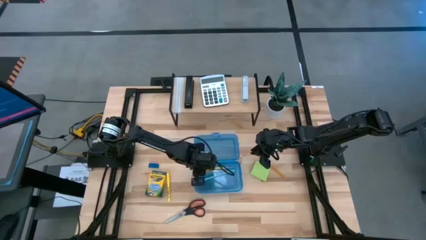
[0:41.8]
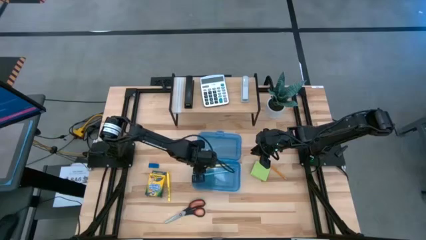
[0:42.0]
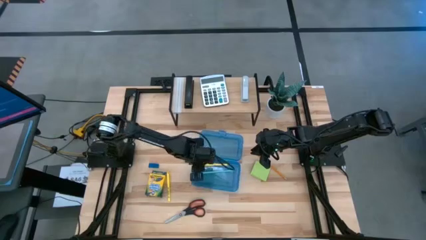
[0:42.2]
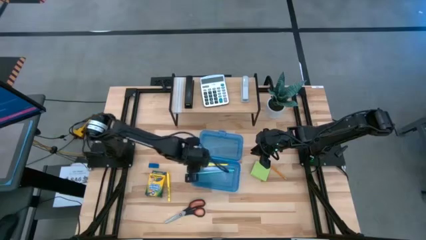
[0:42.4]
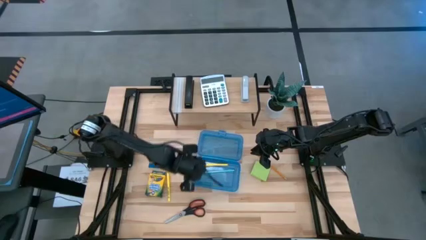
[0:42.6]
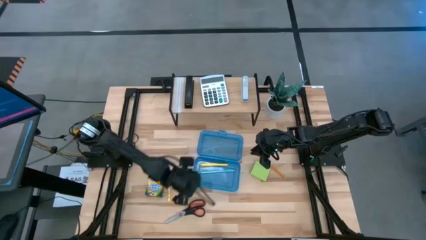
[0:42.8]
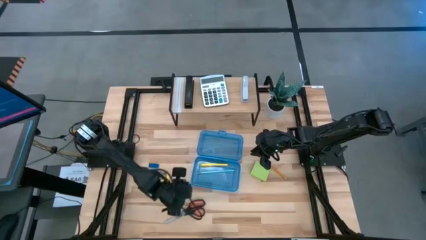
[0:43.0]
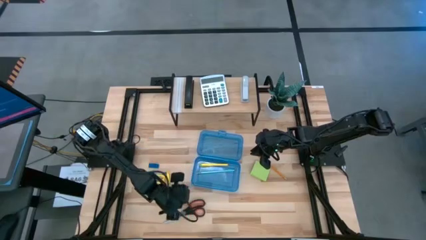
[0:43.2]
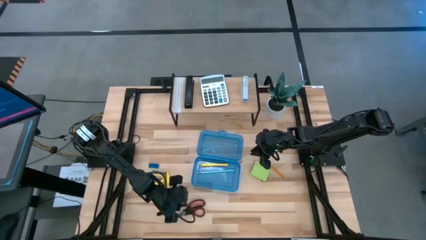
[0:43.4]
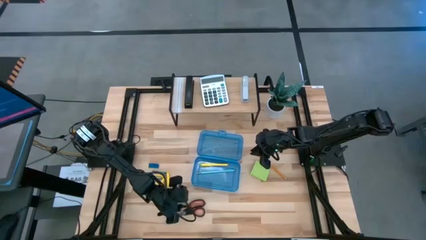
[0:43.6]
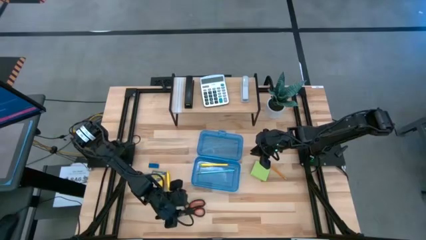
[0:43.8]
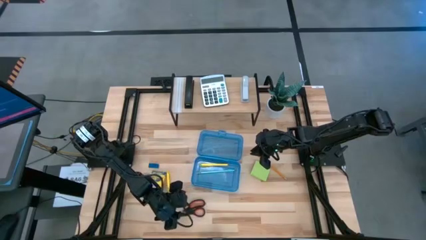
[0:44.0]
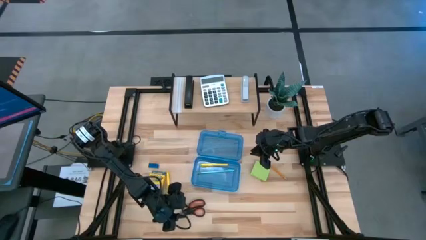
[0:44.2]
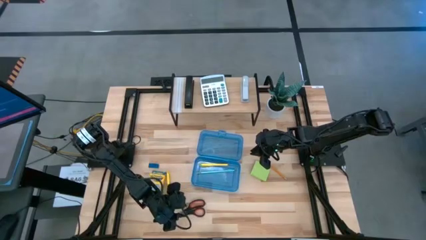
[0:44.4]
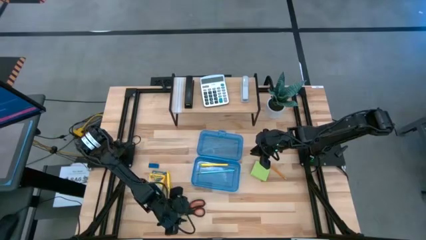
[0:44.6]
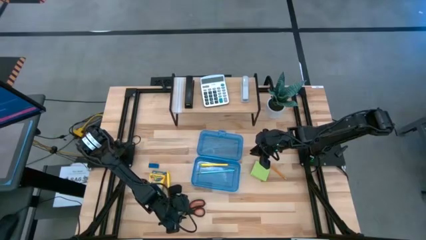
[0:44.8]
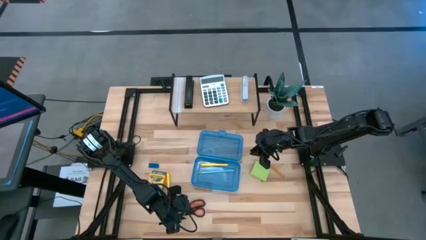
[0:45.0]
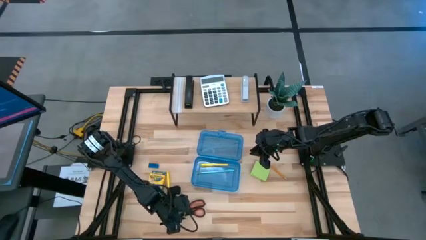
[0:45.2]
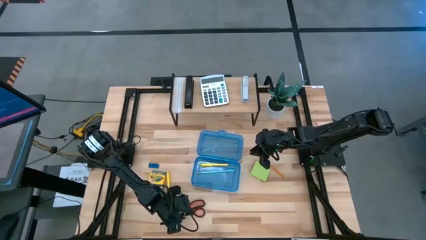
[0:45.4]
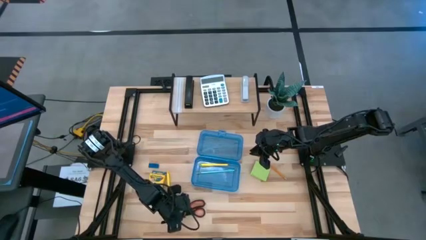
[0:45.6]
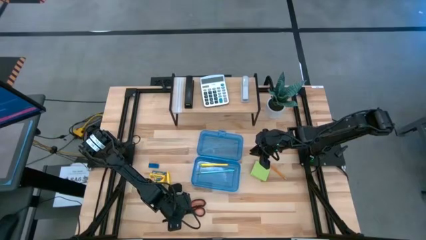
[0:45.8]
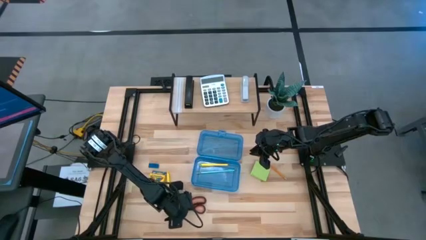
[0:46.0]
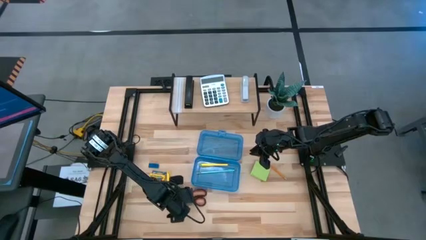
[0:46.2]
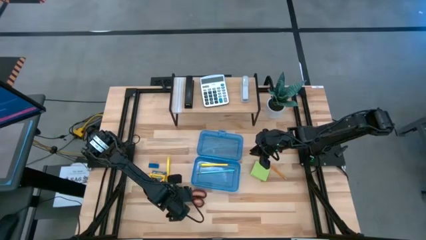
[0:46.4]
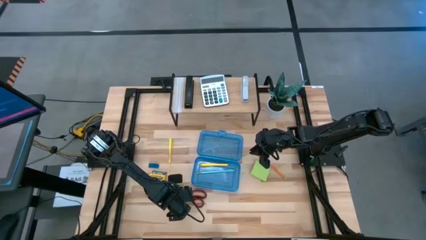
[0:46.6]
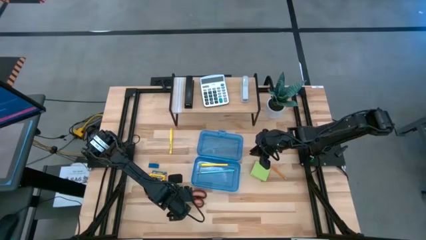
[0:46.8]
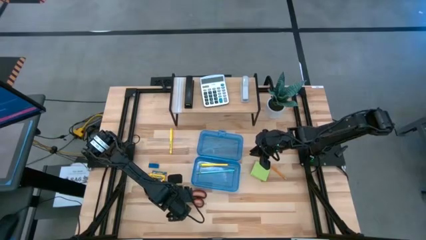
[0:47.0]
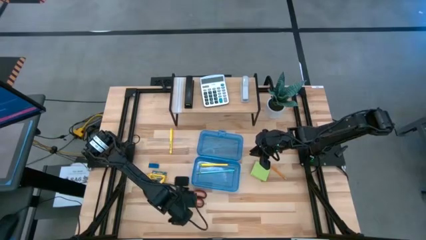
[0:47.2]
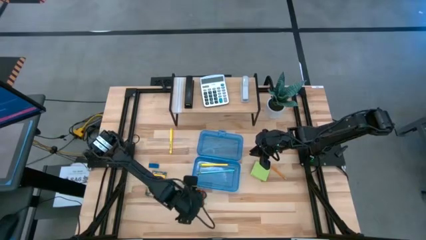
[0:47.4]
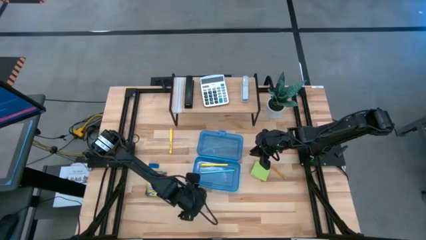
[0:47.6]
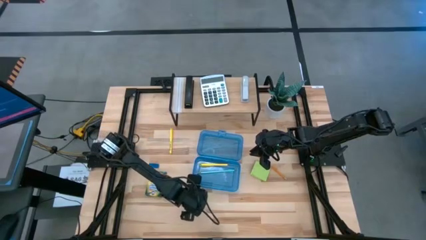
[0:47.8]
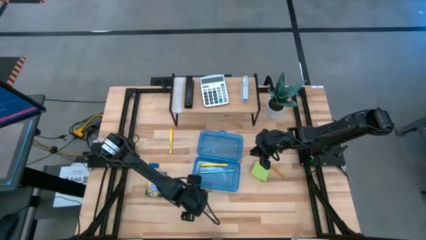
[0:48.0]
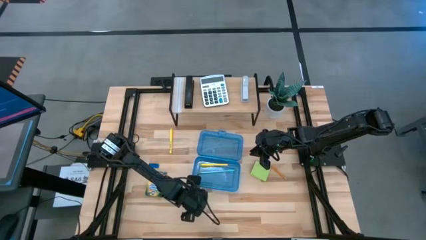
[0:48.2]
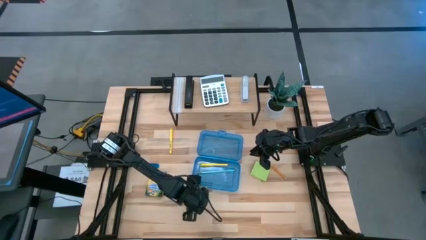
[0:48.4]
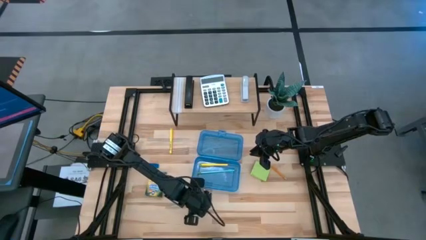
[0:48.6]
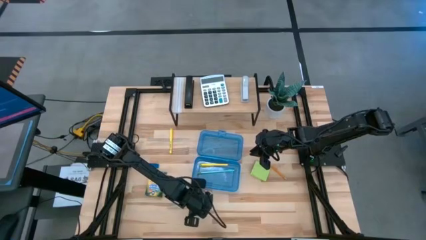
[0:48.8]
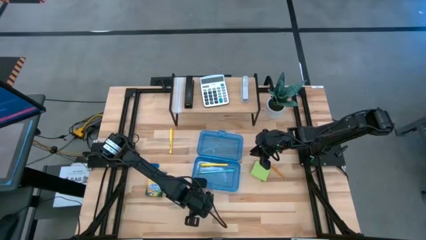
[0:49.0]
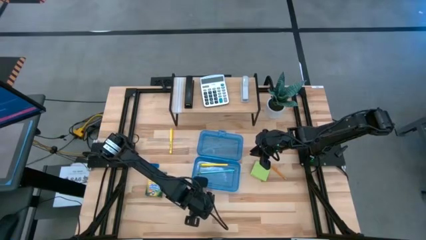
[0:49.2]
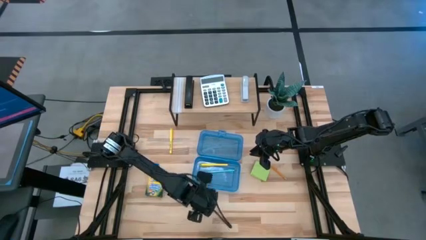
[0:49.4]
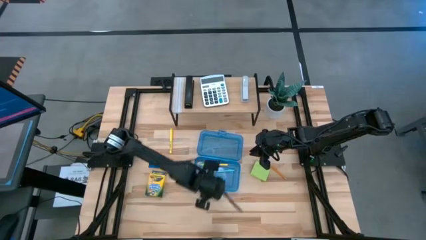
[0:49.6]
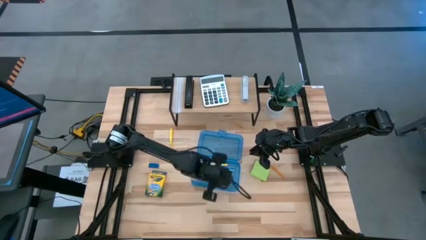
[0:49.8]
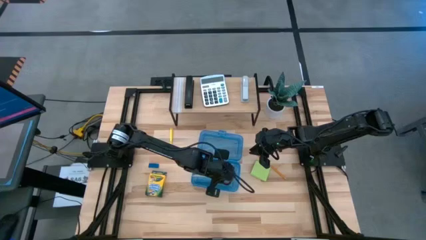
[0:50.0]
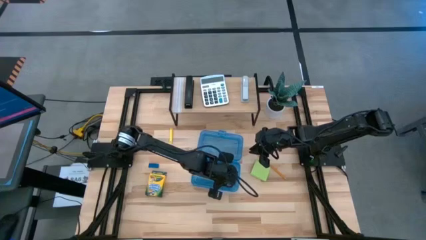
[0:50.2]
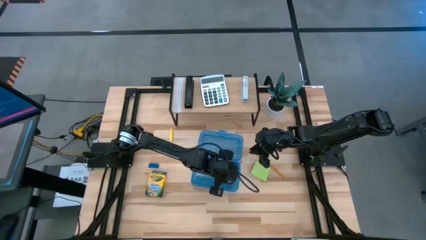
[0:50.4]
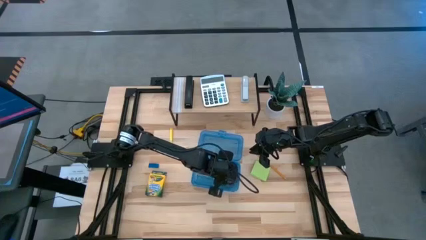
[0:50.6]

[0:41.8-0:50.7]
Task: Pack school essentials
Put the scissors into the blue supply box

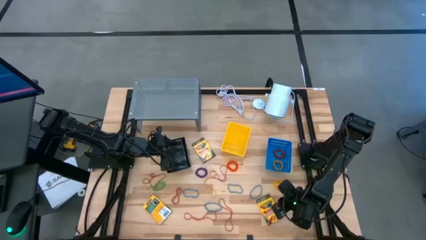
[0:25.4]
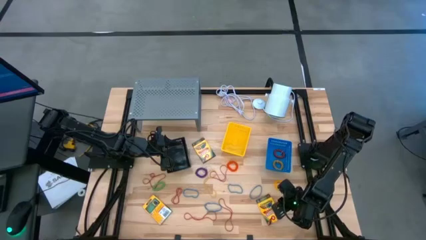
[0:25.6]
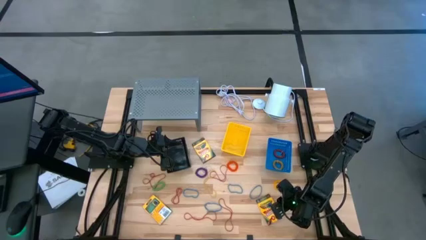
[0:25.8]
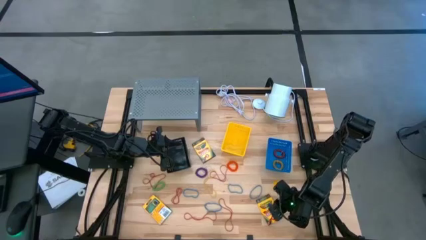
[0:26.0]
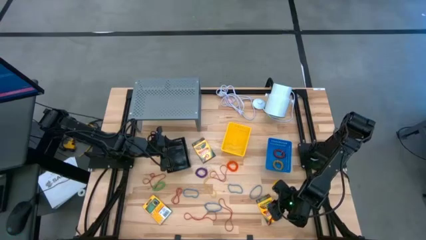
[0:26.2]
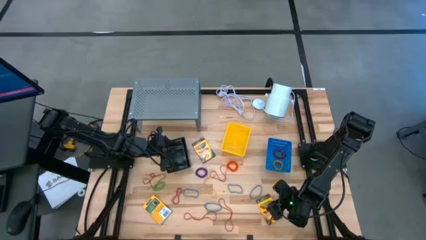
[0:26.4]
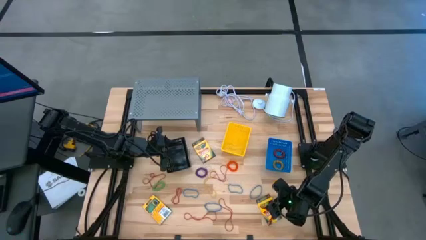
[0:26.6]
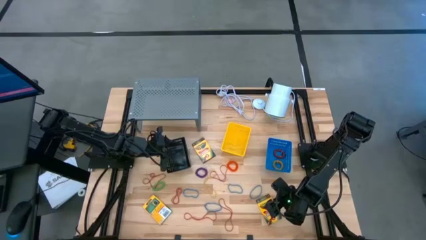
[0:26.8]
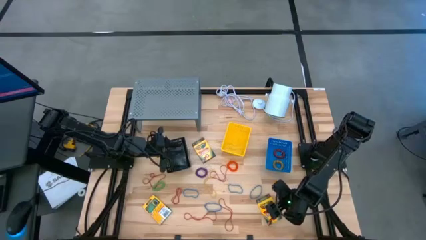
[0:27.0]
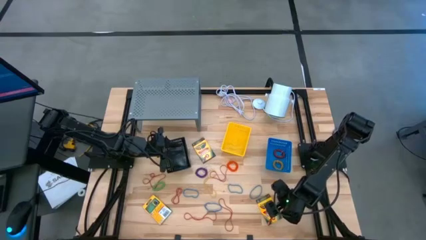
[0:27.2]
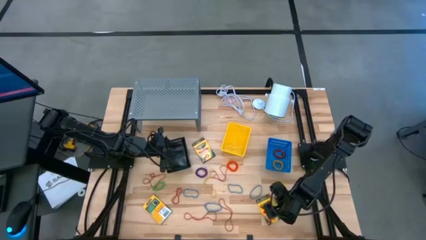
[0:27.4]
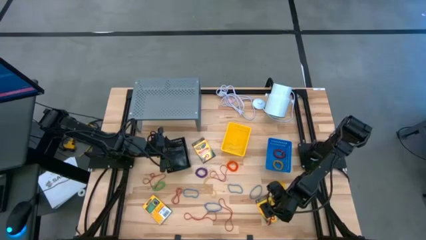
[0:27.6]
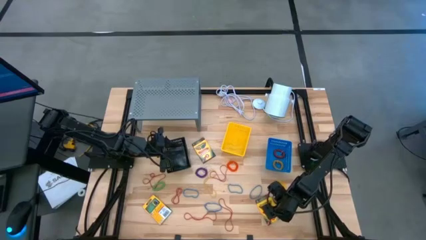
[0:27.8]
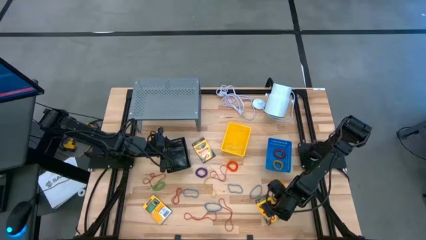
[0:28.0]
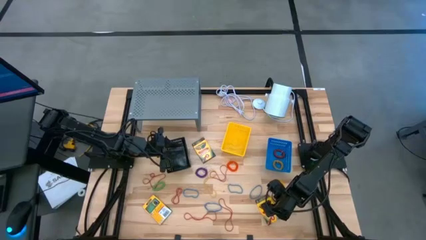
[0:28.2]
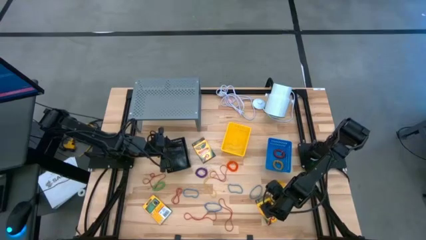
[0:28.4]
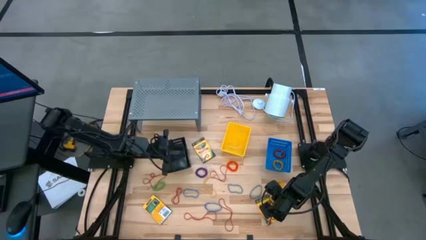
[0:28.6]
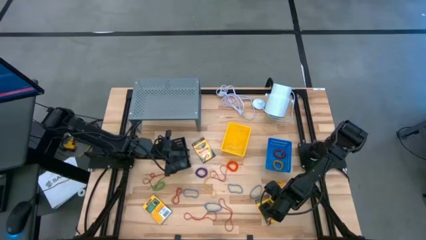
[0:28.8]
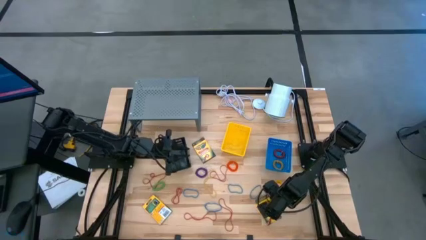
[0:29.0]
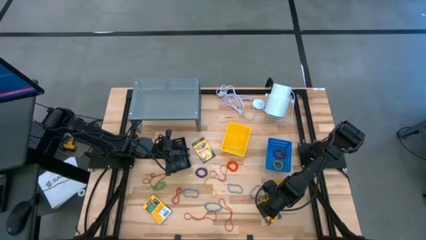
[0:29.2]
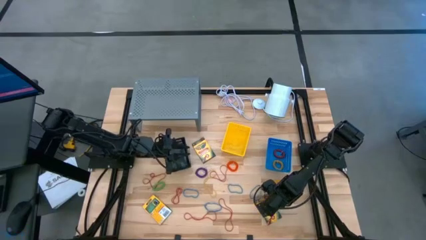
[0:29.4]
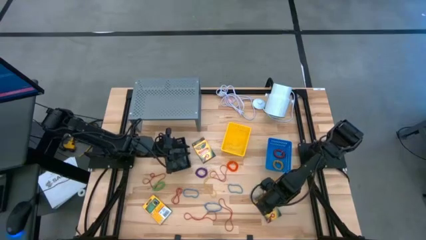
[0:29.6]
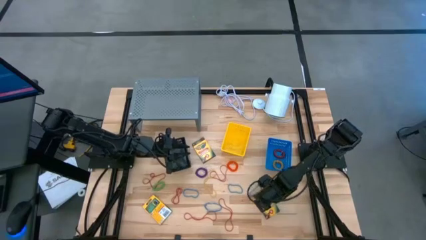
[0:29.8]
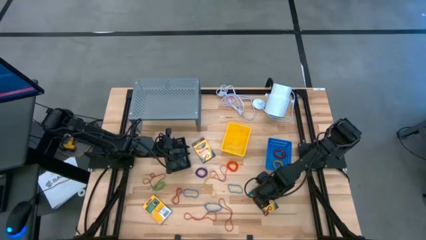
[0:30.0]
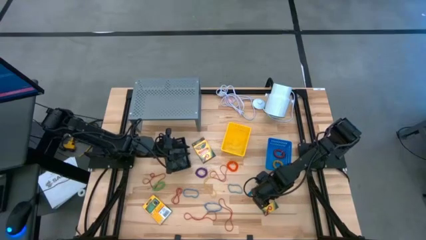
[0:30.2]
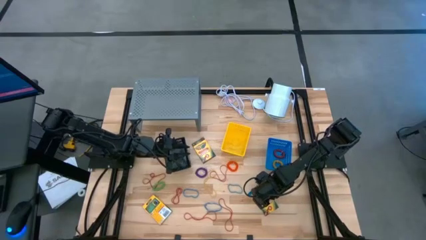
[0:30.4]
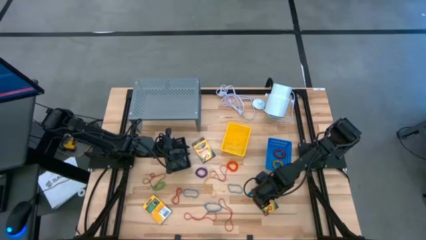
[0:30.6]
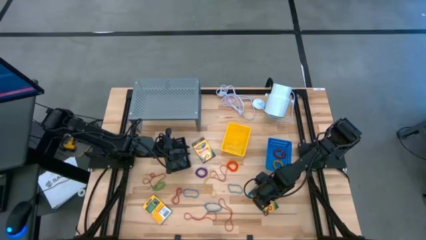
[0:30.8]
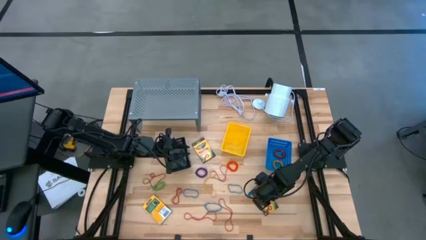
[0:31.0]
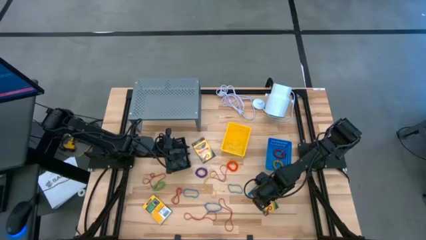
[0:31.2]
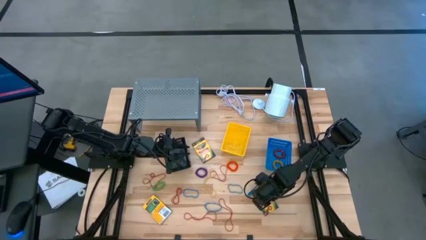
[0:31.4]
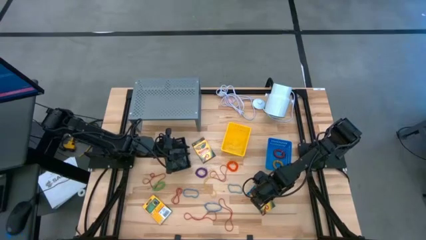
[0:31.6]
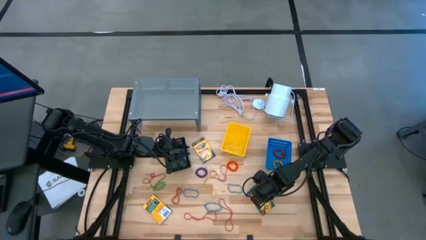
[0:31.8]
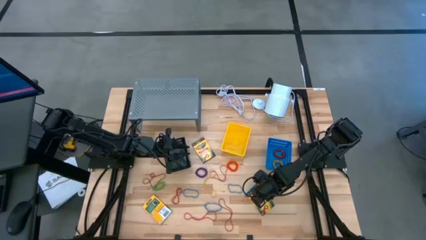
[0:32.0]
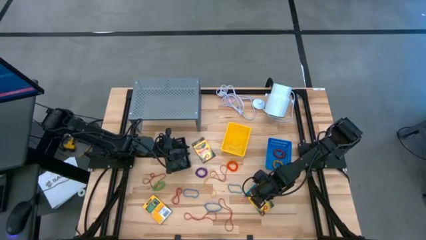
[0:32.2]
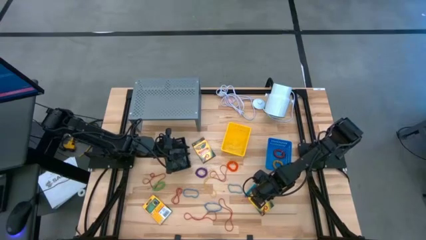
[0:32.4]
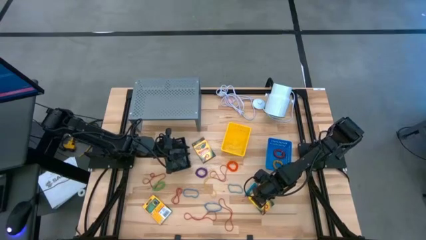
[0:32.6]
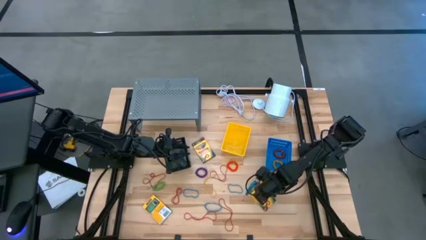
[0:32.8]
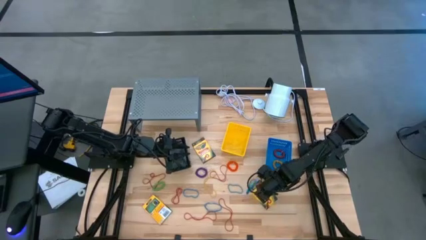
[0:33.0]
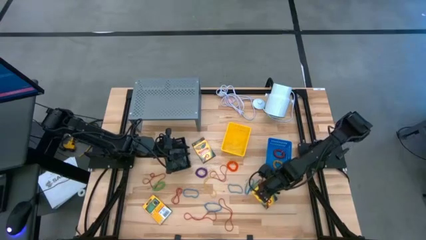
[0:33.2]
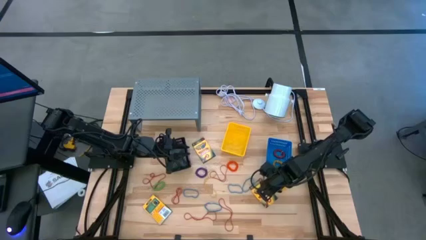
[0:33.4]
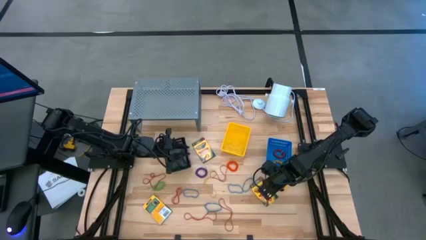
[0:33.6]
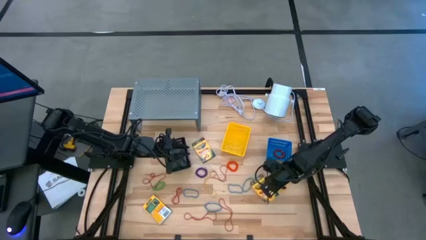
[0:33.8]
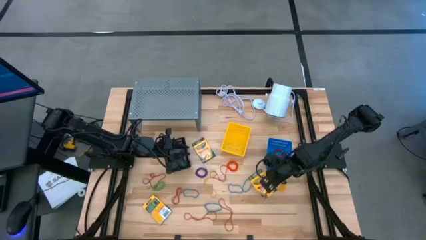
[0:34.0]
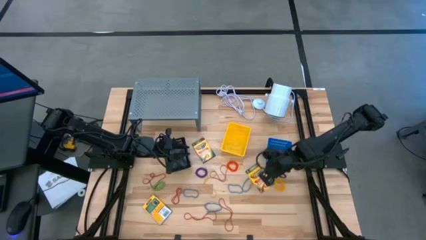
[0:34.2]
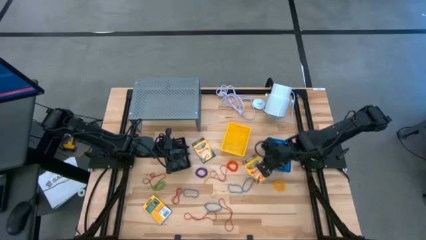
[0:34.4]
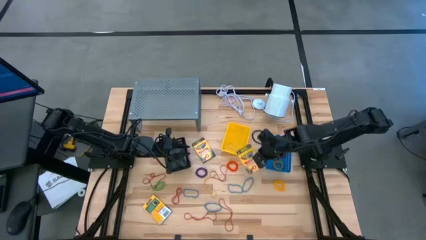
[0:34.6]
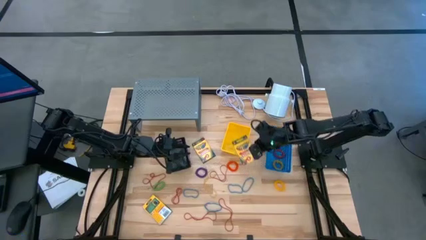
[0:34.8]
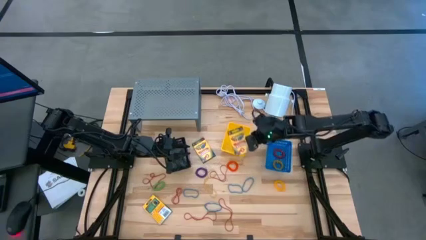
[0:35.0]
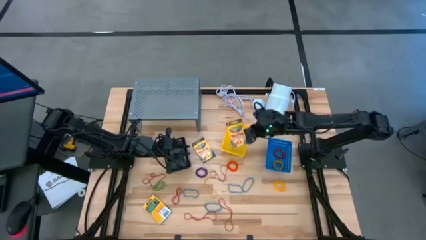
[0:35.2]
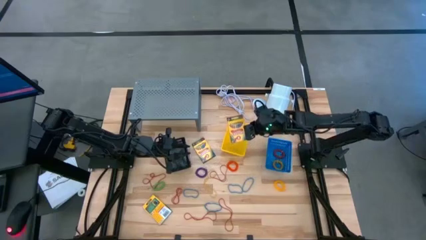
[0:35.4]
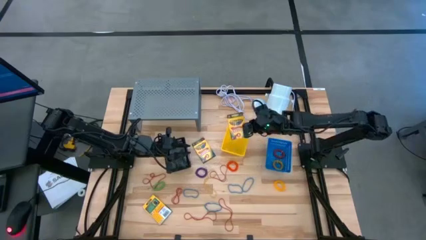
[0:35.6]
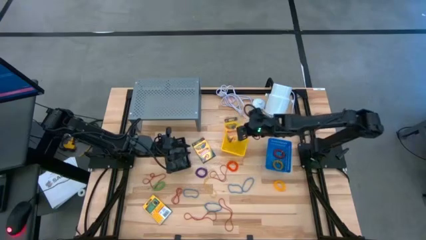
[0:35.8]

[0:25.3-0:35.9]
Task: Pick & Place Office Desk Supplies
Put the yellow crayon box into the yellow bin
